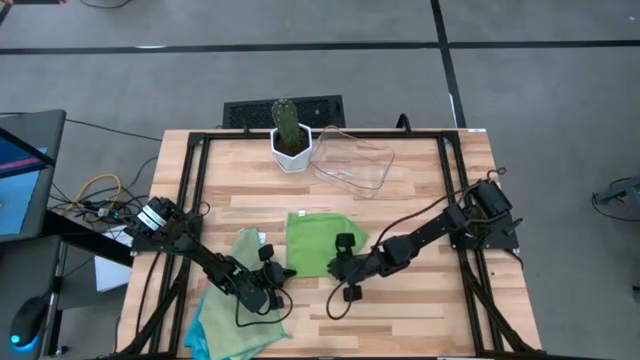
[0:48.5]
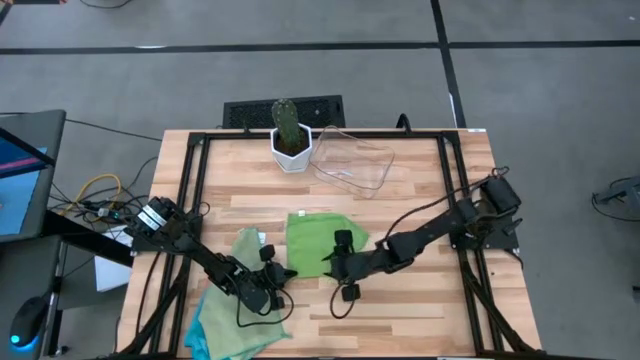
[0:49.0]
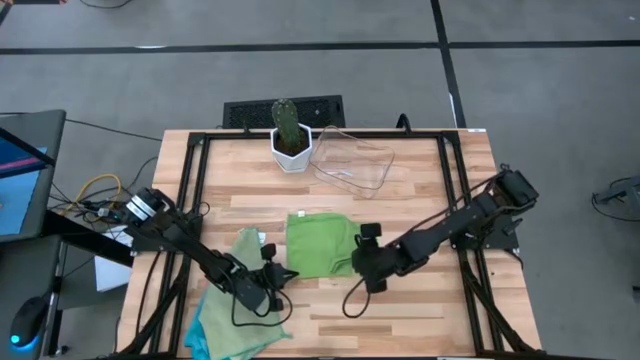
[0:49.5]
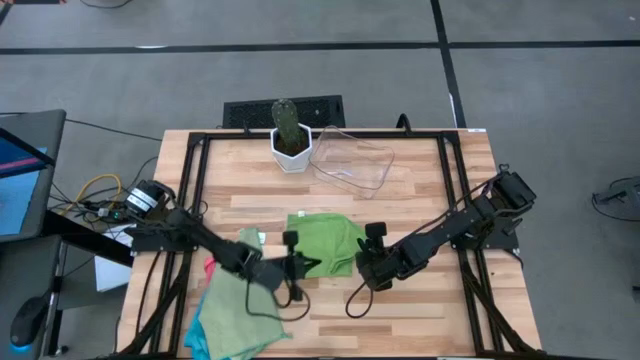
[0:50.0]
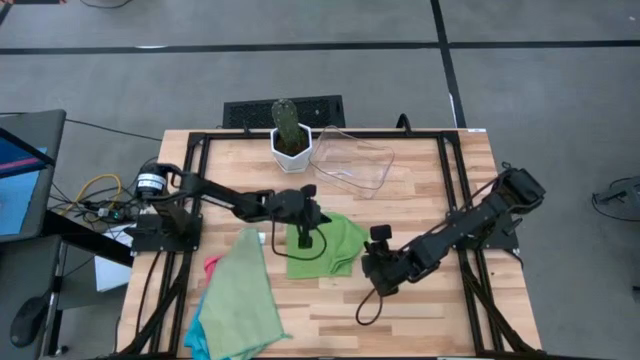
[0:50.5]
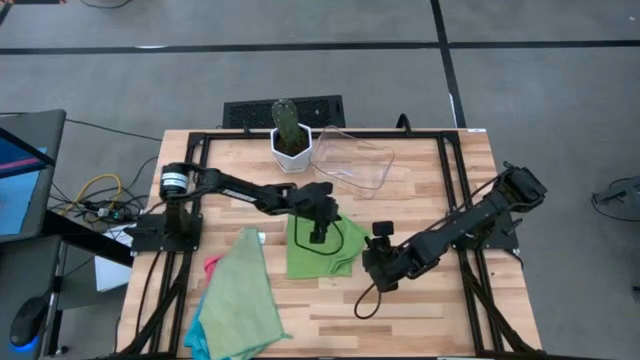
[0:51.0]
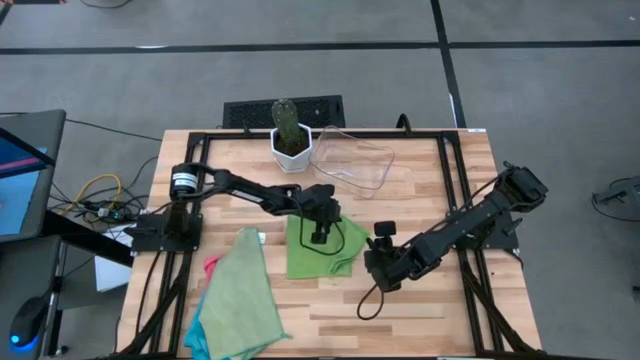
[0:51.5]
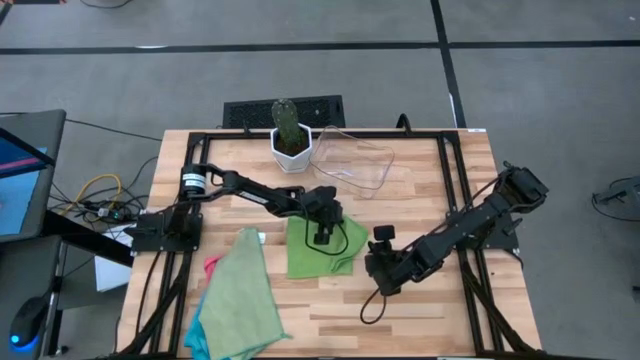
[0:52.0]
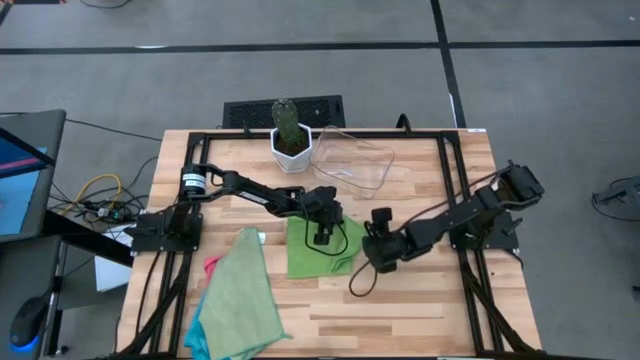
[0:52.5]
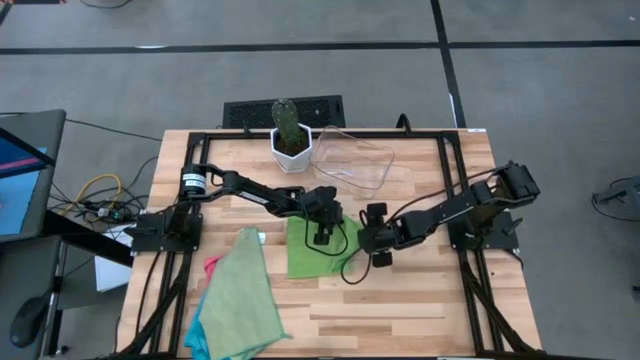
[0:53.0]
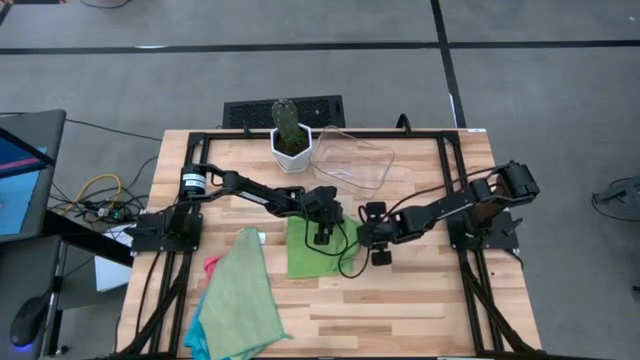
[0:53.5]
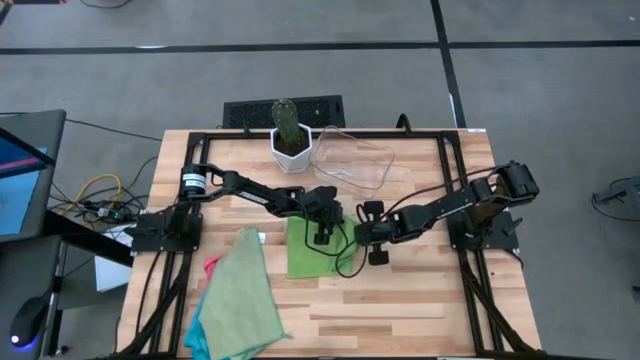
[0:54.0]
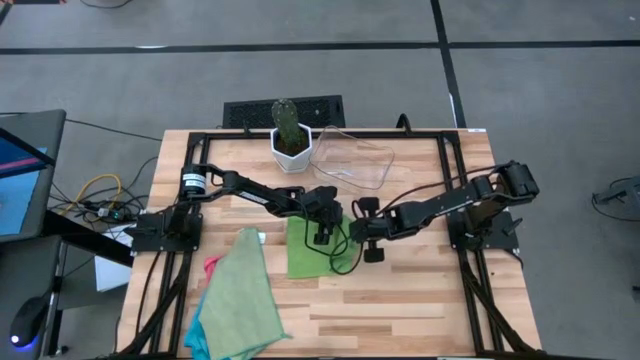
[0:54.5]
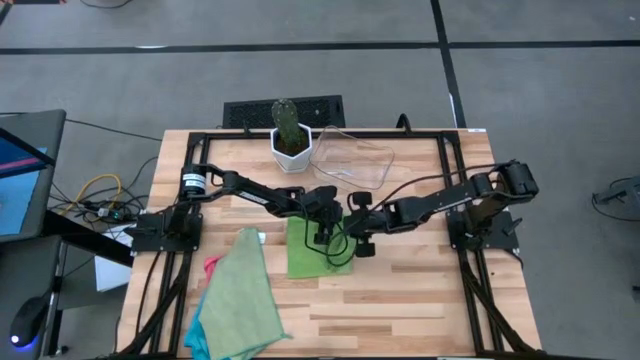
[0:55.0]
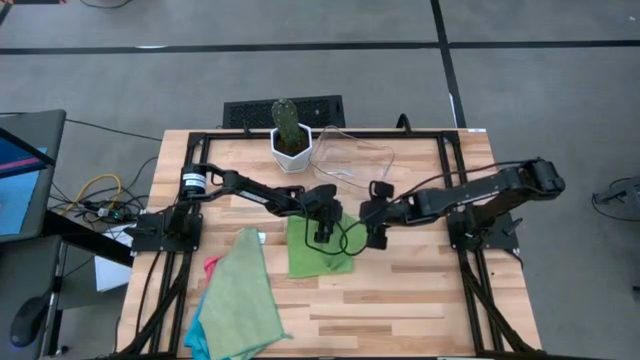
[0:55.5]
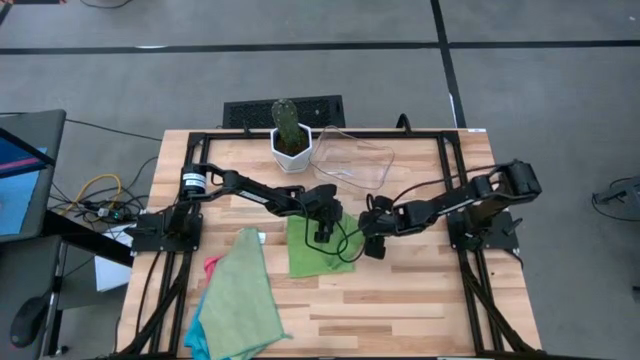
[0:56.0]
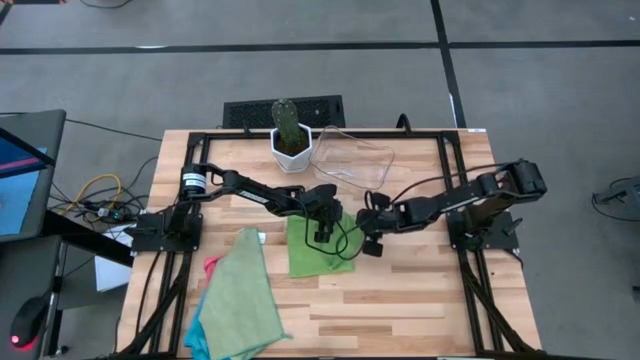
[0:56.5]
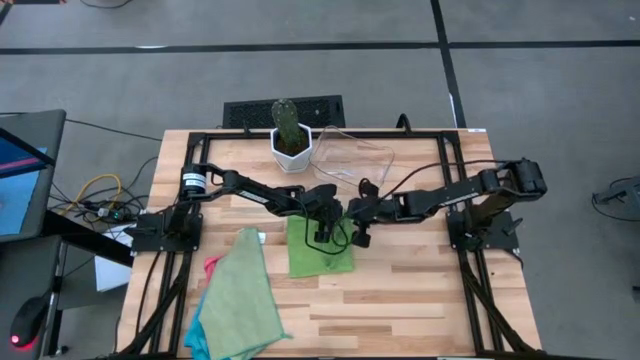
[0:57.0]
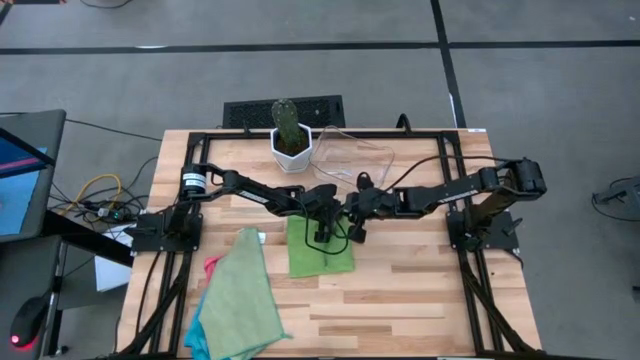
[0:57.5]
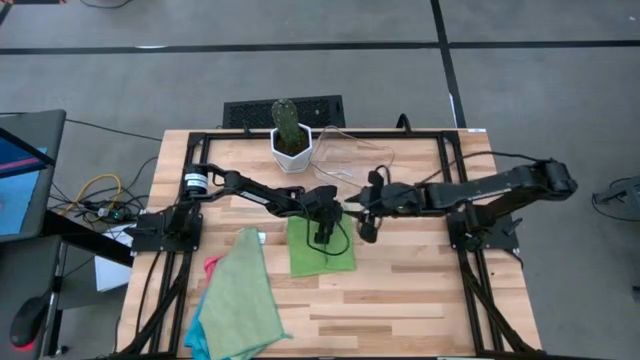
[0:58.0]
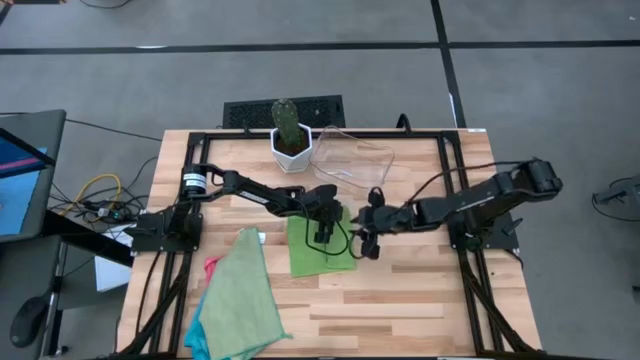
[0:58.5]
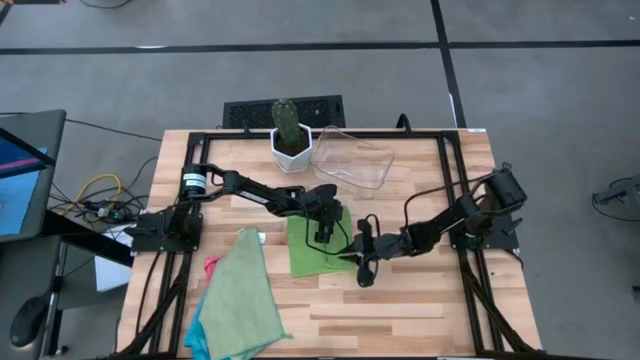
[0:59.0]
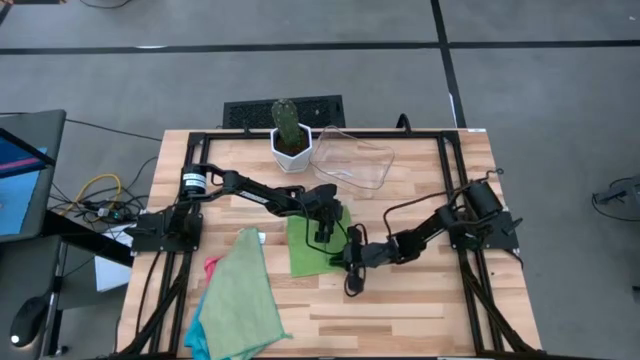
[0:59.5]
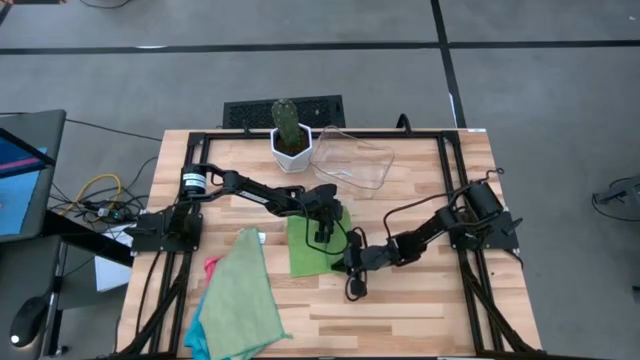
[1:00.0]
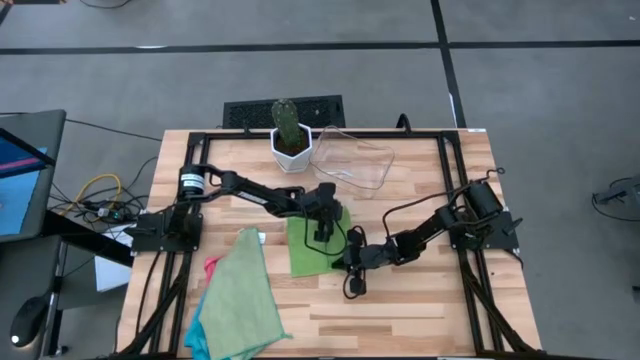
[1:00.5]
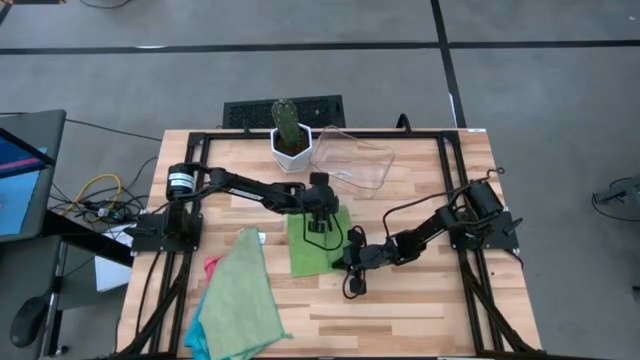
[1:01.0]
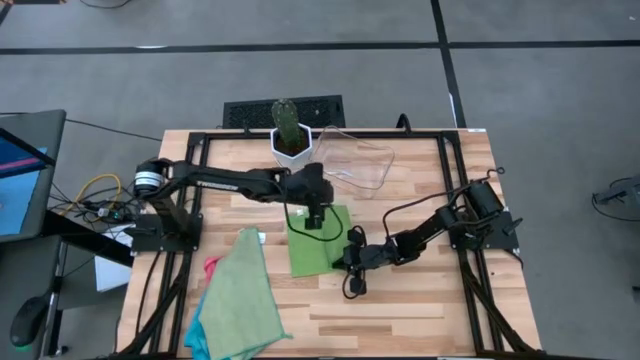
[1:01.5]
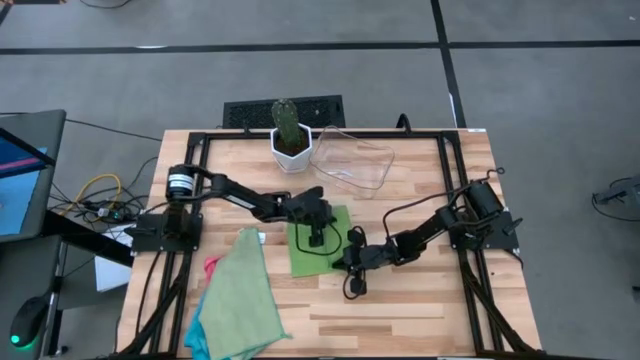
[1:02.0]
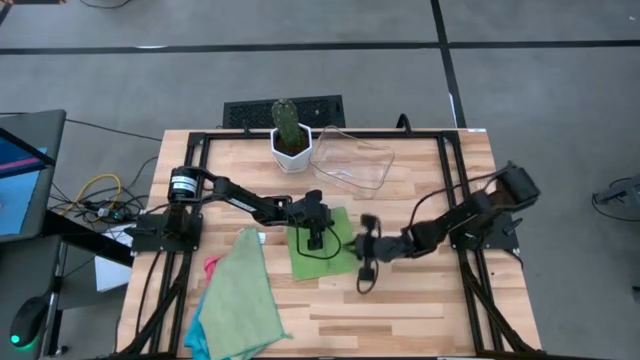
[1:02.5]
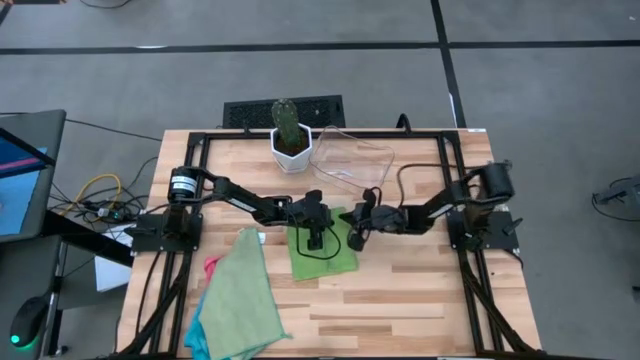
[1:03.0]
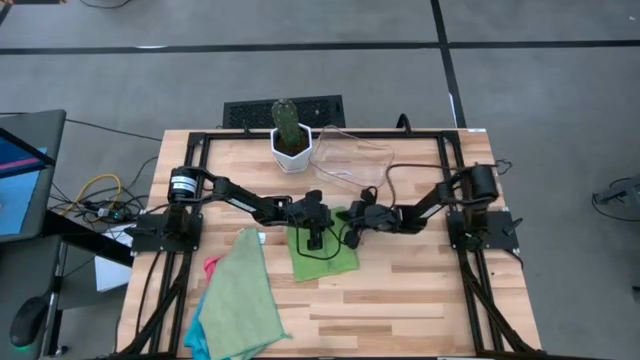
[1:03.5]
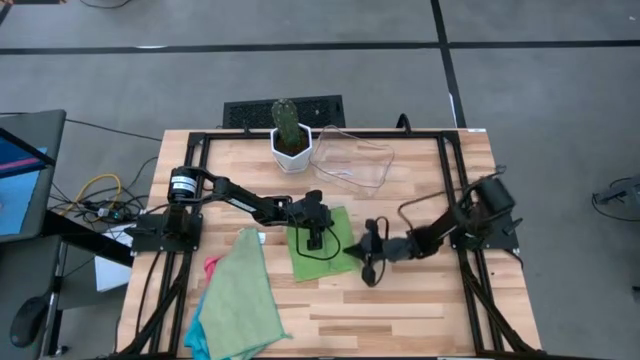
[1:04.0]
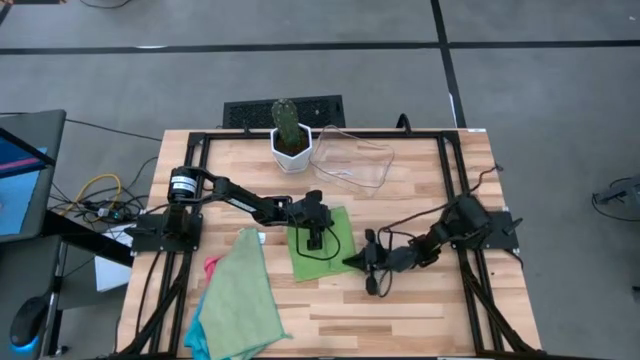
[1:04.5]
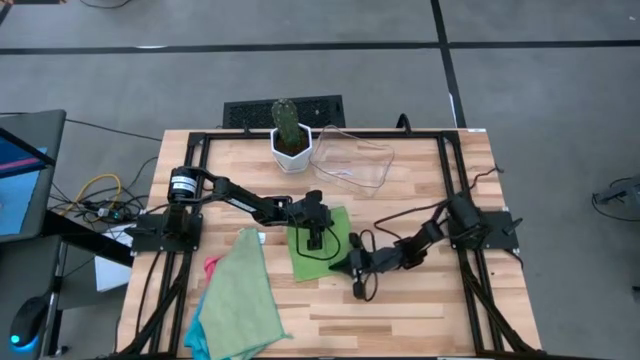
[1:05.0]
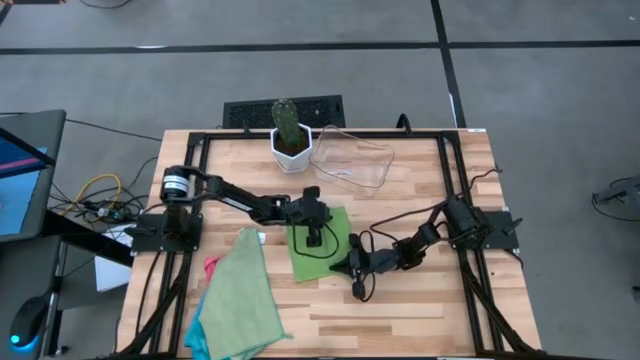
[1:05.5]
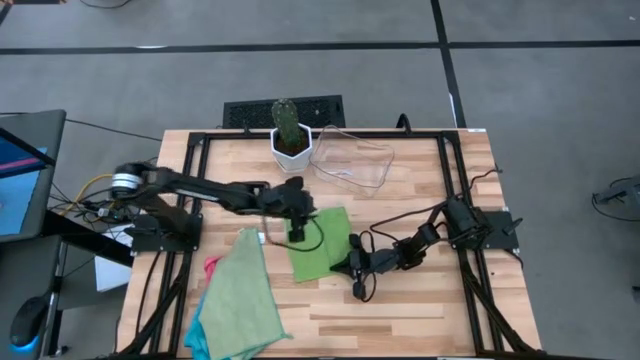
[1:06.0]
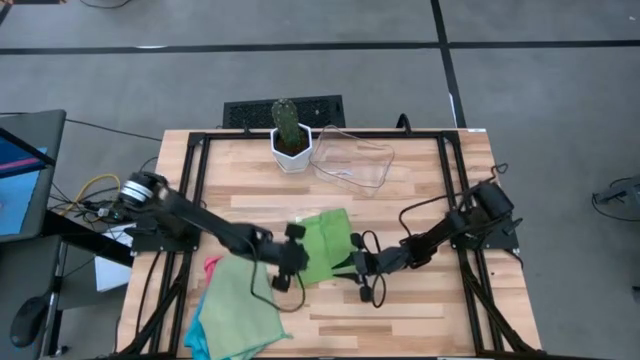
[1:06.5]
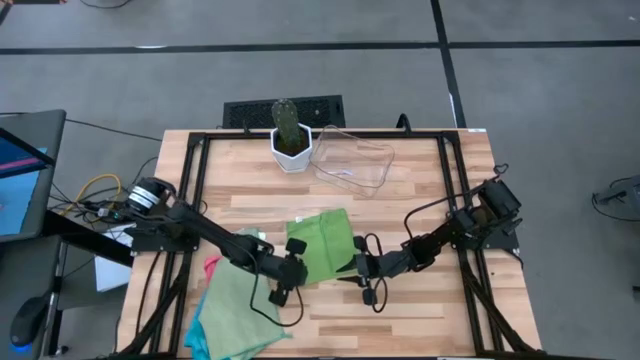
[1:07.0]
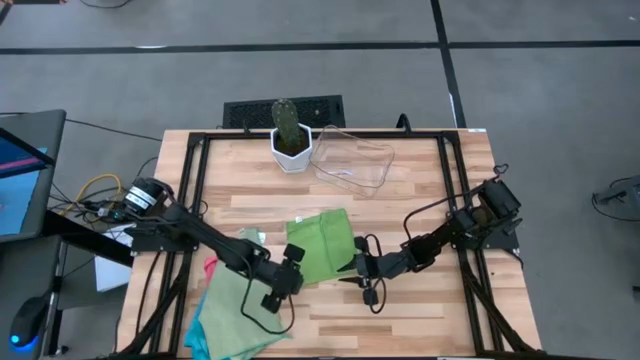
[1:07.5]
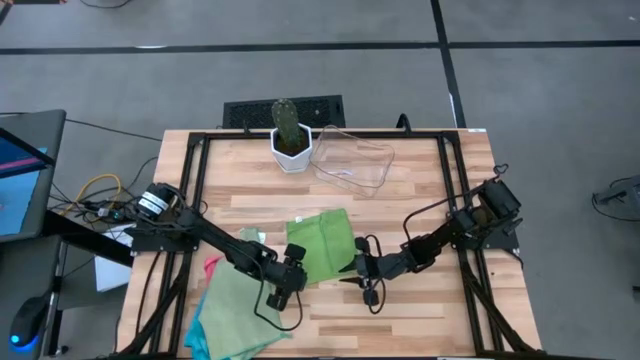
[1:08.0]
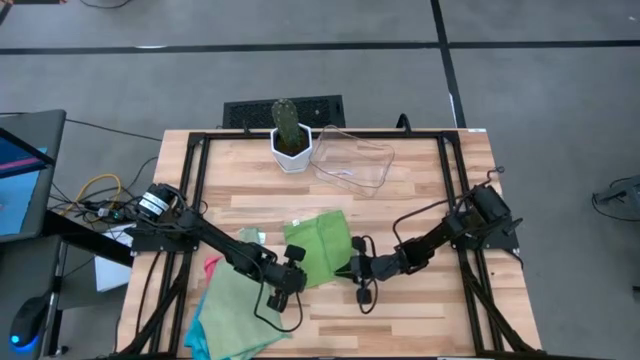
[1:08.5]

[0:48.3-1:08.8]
Task: Fold microfiber towels
Fold the green towel
